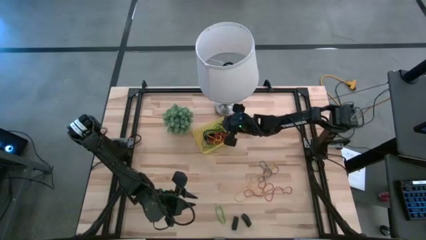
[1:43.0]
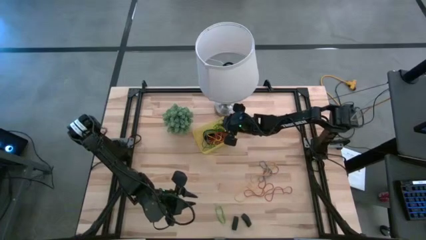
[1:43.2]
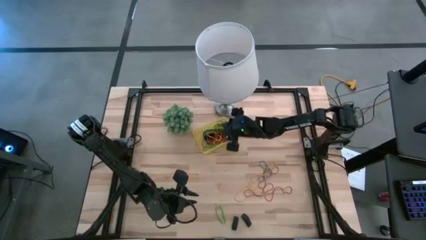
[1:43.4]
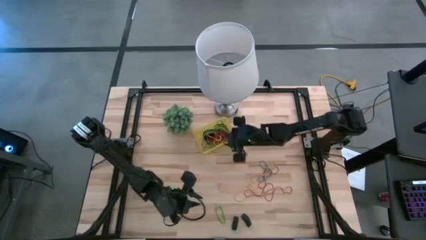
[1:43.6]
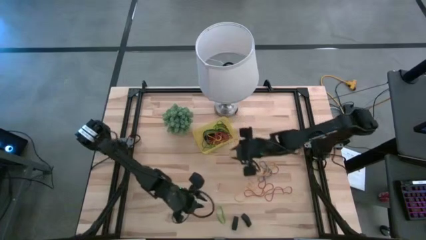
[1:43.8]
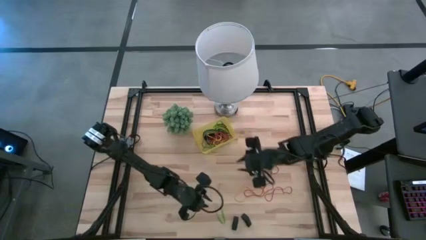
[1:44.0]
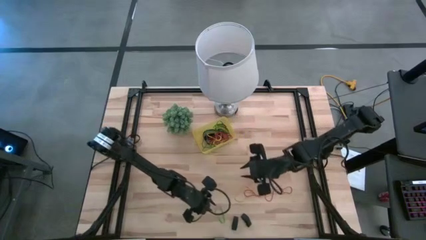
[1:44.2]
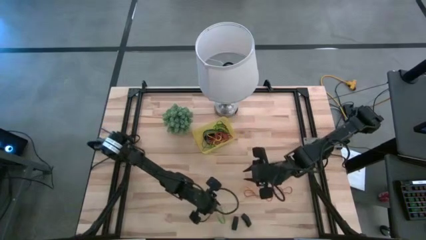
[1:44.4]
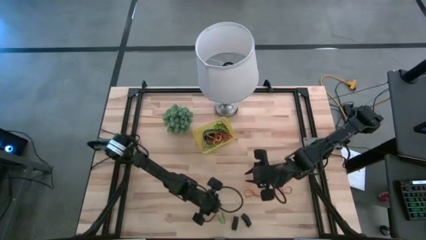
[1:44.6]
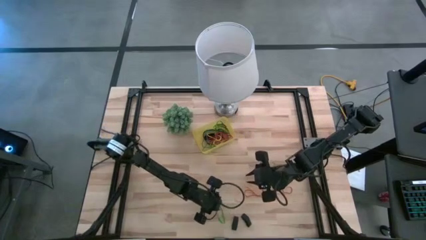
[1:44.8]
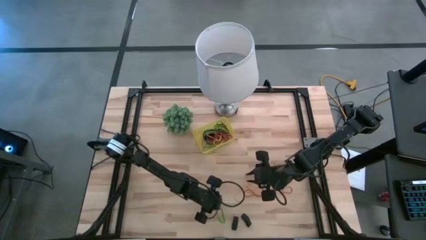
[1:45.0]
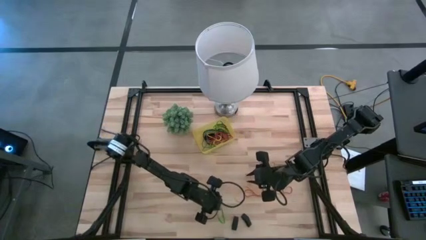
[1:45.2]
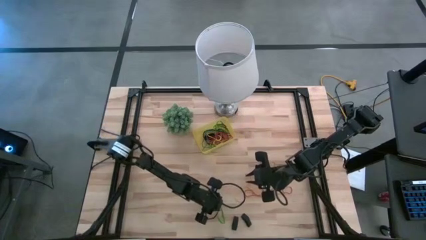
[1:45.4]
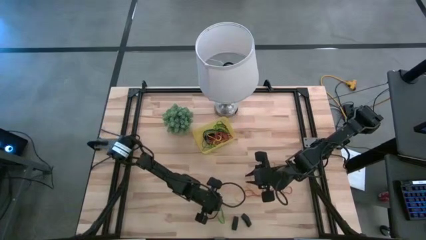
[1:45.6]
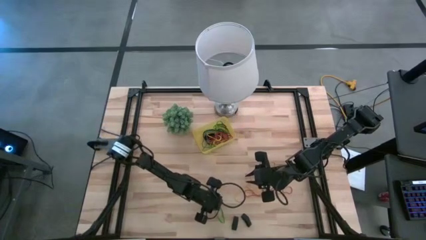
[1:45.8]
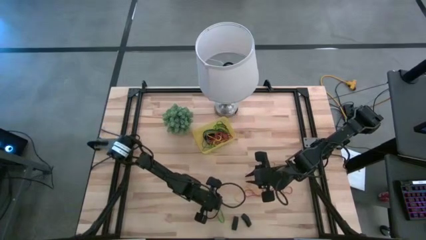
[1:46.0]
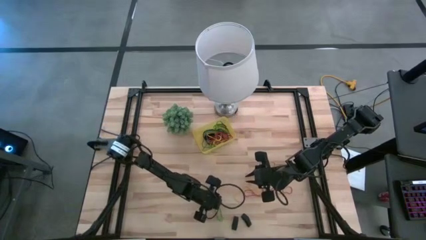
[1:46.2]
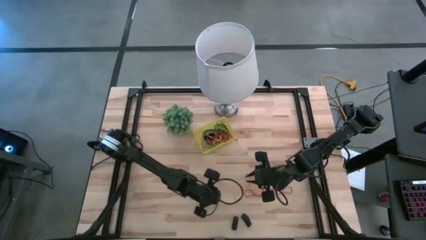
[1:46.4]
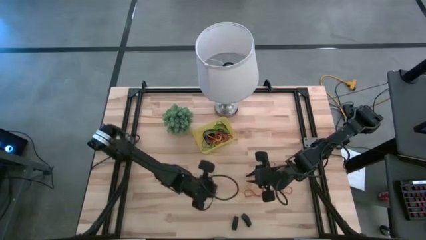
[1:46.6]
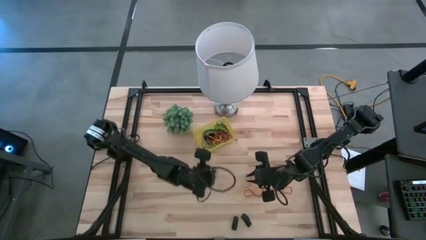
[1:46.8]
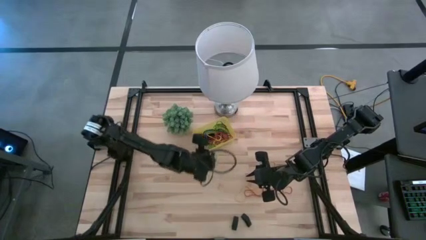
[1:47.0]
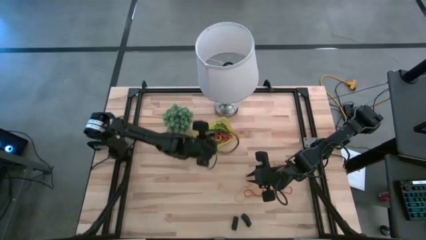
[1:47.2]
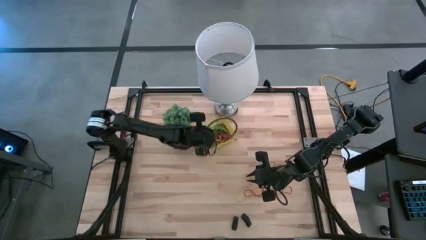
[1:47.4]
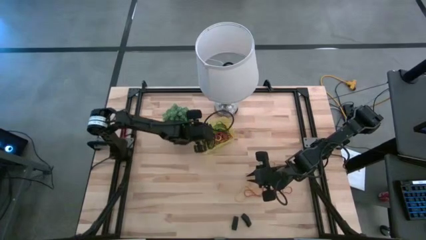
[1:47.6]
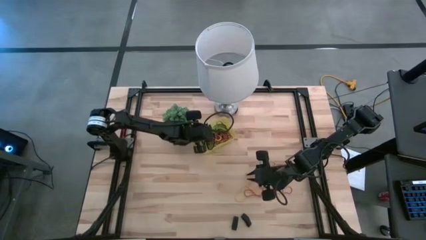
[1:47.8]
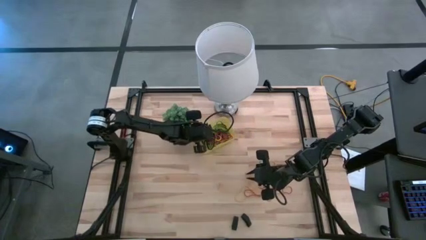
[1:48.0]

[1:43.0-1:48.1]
Task: Pick and place rubber bands into bin
Put the green rubber band into the yellow bin

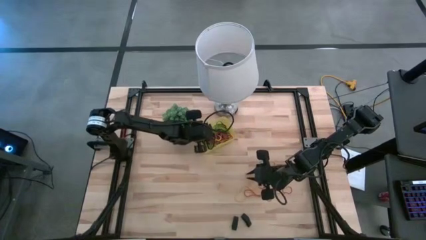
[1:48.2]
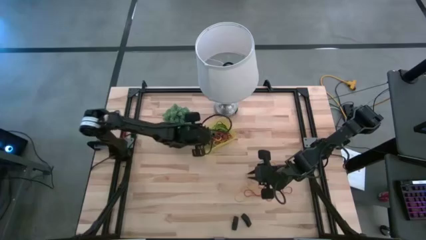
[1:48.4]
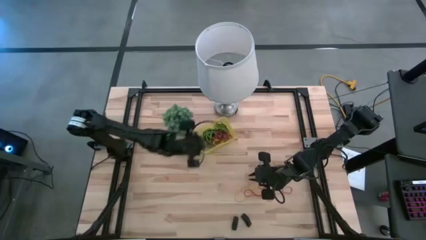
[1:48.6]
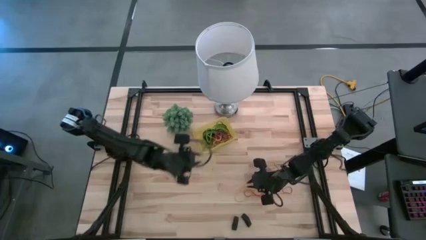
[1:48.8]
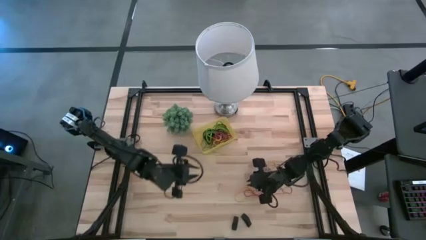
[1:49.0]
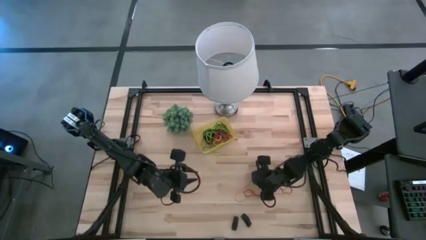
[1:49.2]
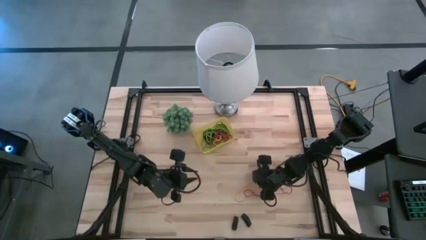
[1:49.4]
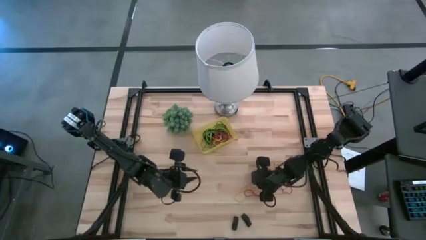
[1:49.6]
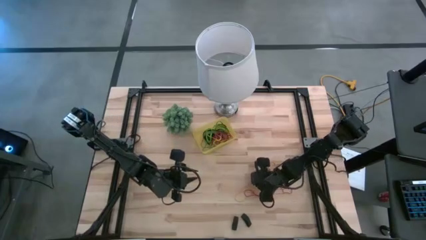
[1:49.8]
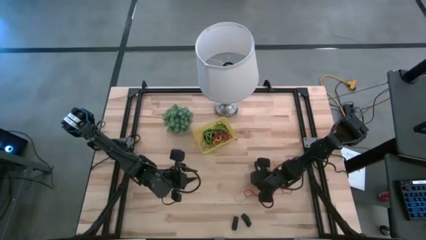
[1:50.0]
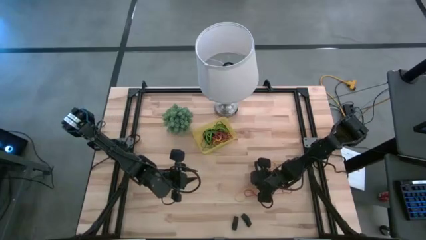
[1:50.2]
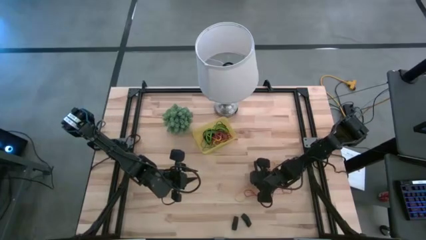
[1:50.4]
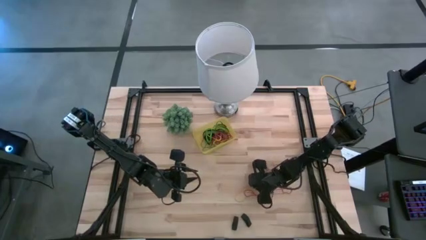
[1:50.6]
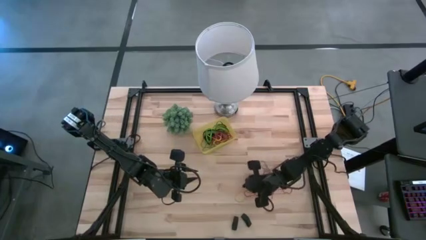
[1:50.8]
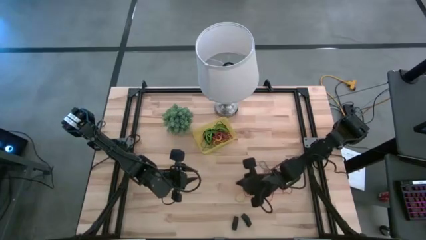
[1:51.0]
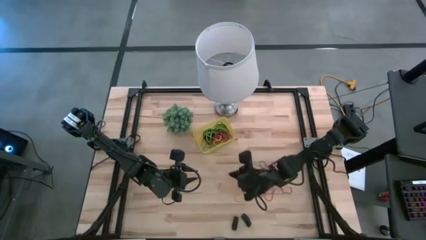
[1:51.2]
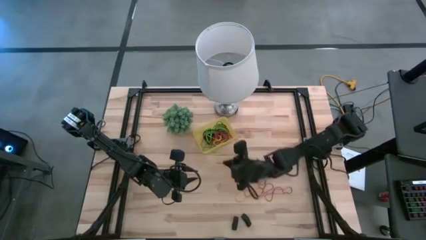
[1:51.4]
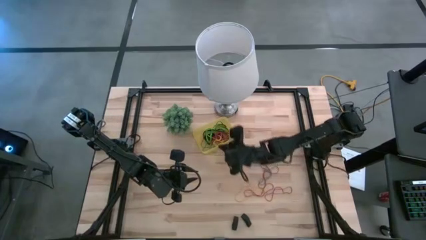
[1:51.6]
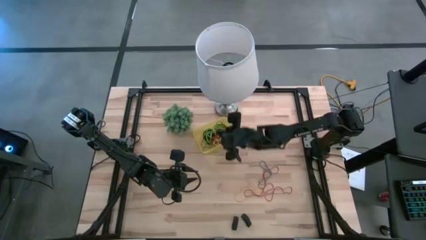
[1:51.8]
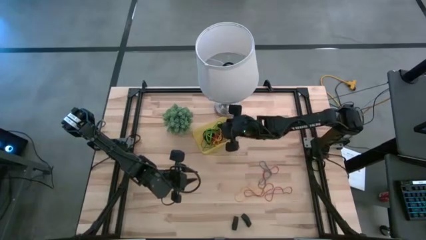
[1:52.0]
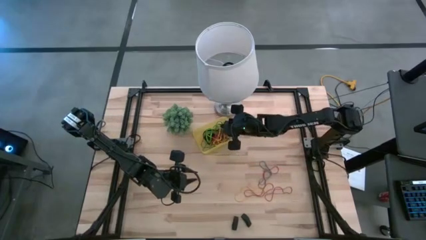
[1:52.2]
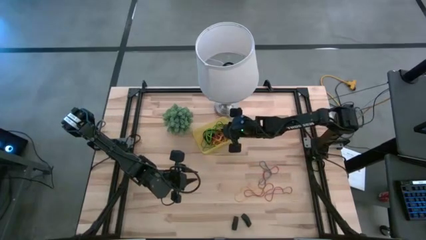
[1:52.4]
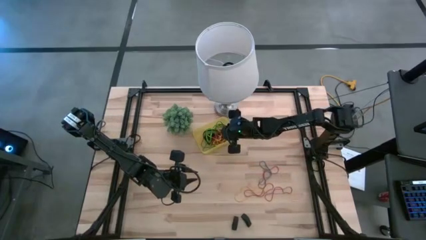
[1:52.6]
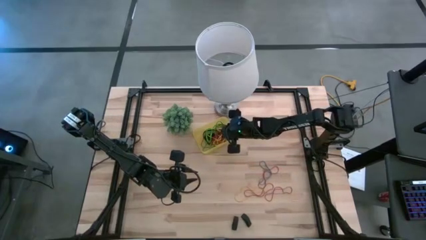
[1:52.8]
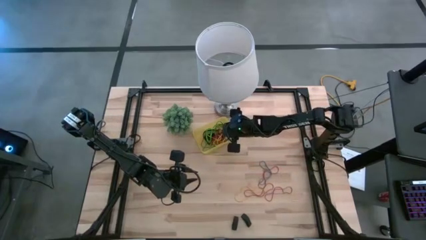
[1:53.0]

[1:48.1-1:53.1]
Put the top yellow rubber band into the yellow bin

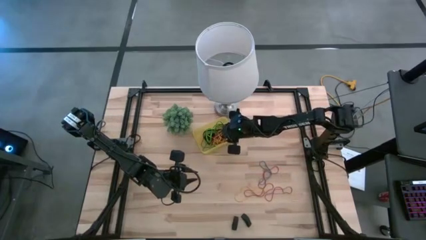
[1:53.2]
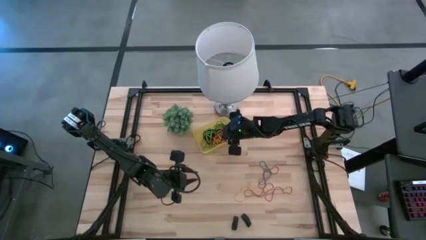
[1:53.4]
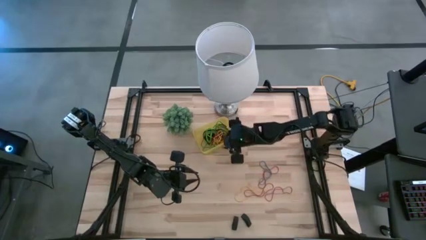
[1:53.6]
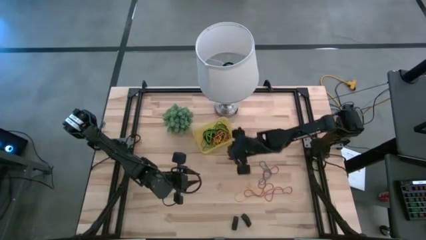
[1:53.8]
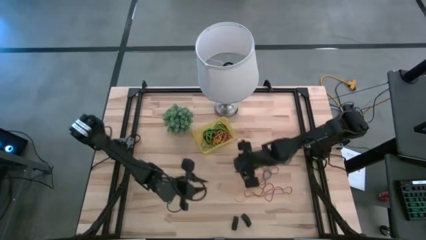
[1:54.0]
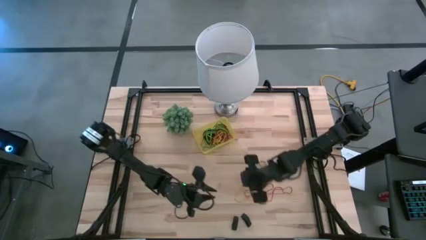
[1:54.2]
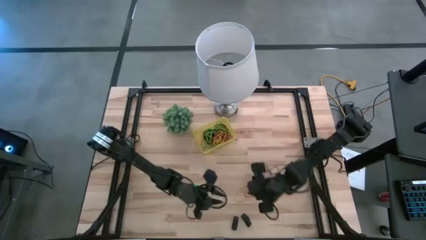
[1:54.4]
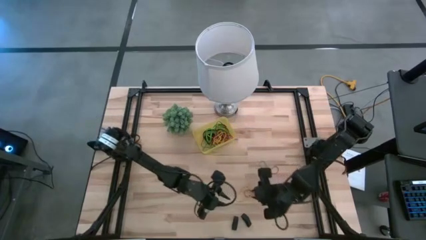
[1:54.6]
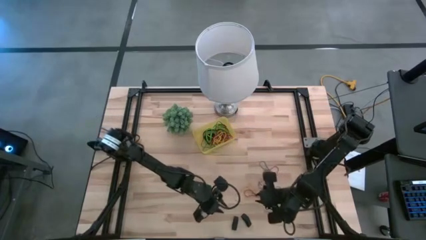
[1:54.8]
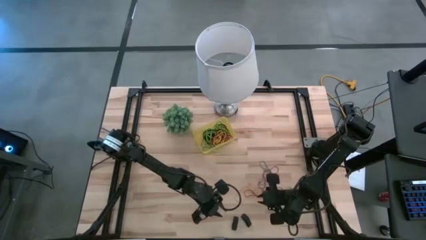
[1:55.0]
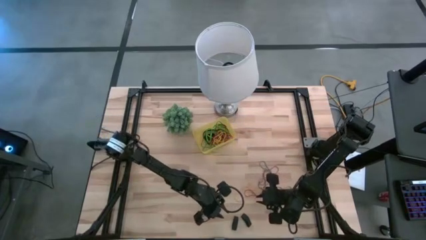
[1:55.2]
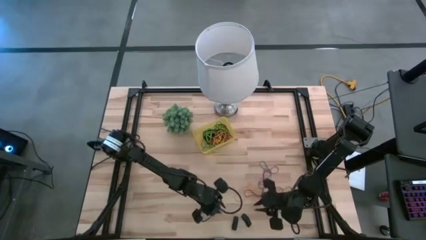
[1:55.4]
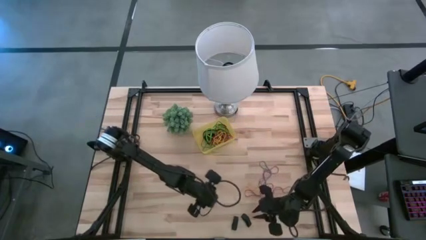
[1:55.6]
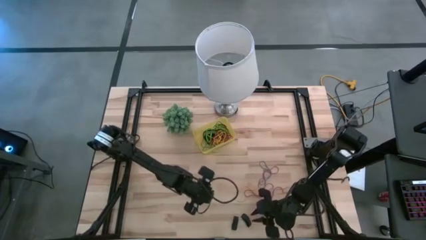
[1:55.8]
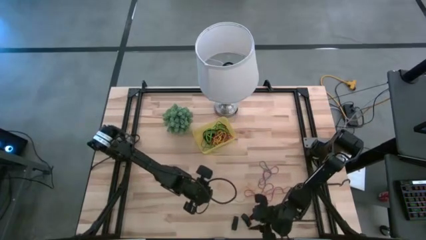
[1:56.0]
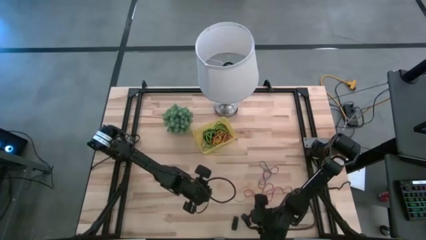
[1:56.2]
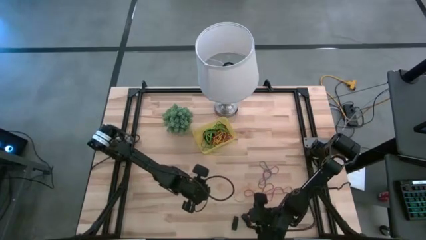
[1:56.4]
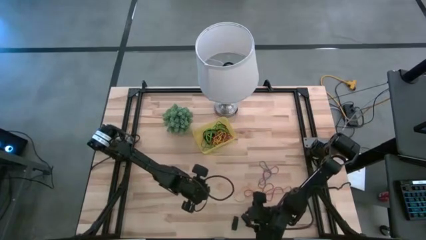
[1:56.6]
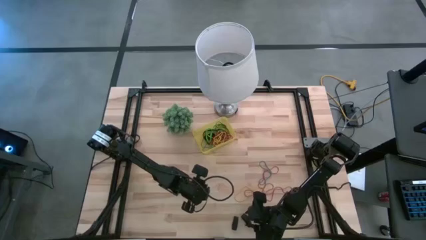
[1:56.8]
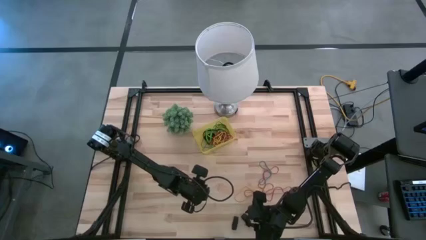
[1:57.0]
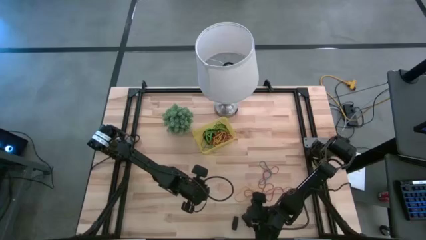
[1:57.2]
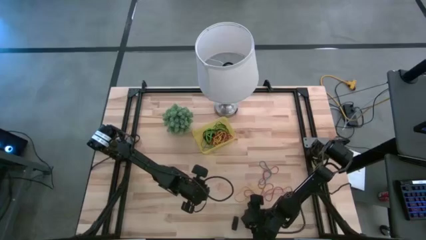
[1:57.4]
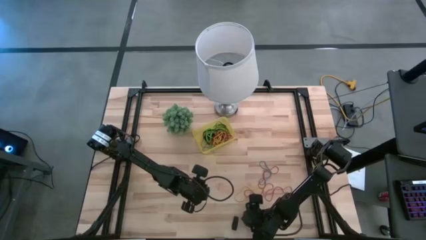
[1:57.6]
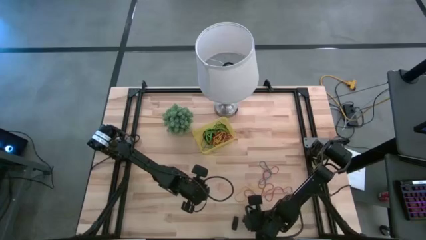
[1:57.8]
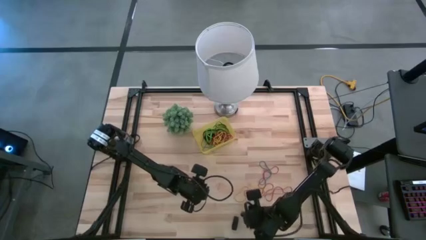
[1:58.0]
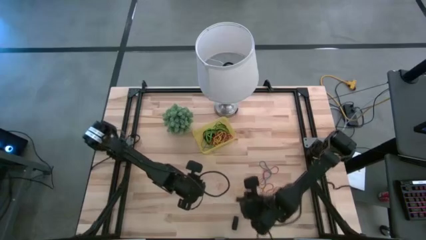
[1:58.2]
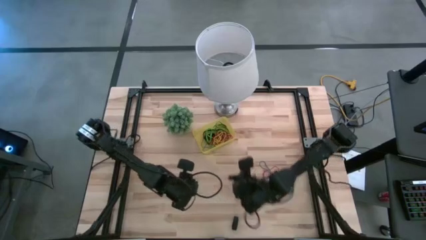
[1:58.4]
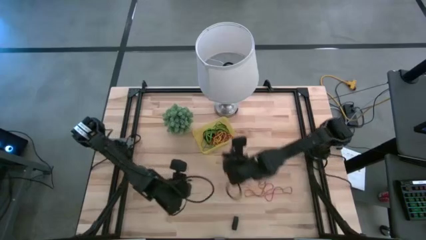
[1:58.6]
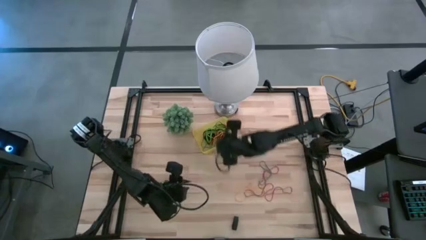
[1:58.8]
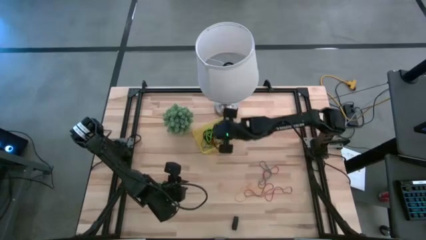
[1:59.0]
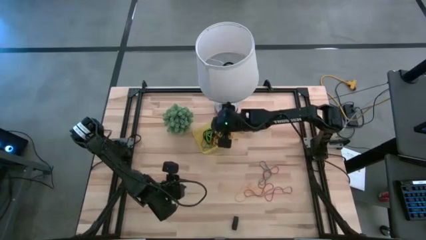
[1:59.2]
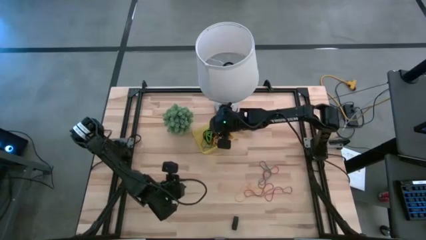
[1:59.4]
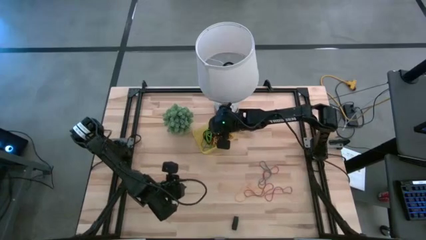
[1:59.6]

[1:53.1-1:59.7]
Put the right black rubber band into the yellow bin
